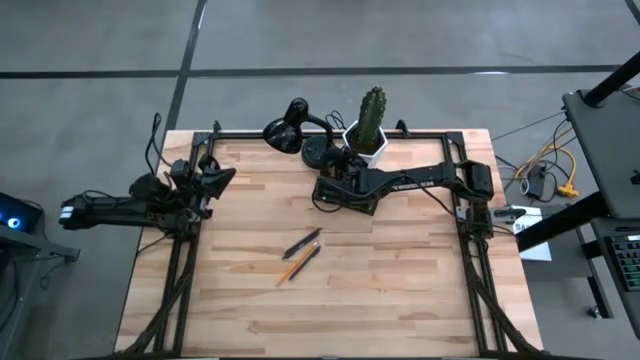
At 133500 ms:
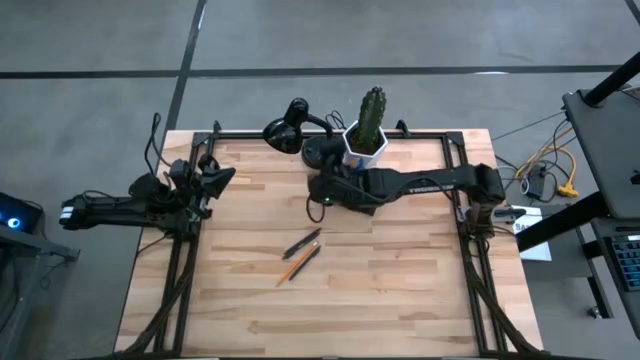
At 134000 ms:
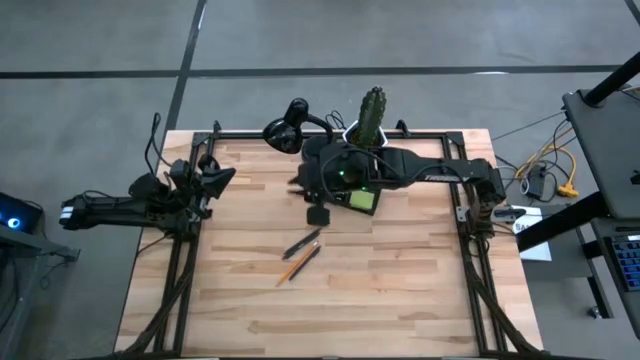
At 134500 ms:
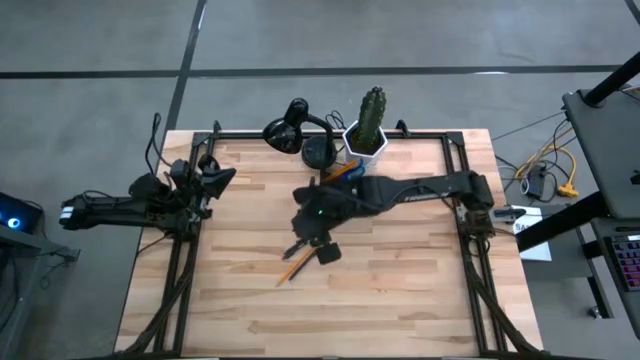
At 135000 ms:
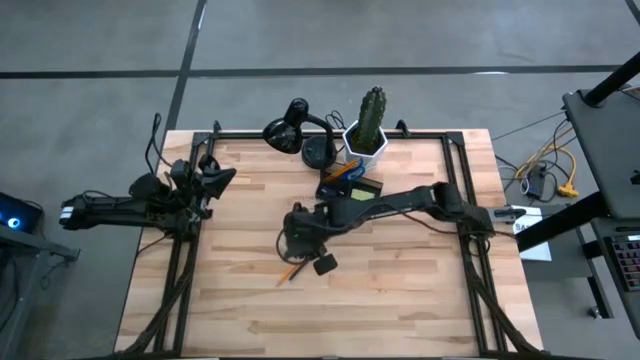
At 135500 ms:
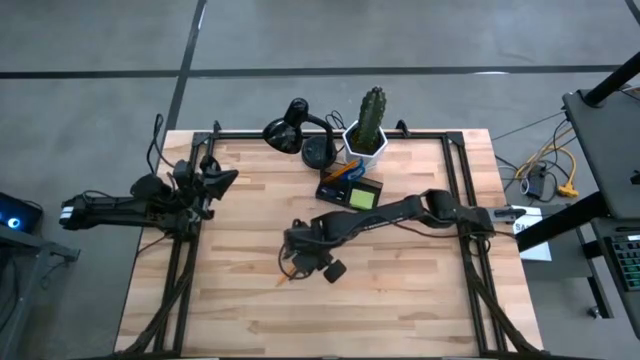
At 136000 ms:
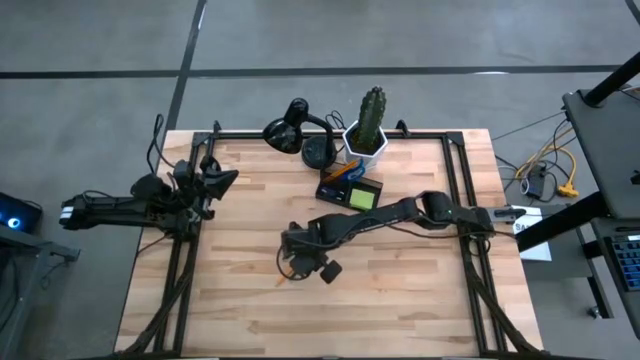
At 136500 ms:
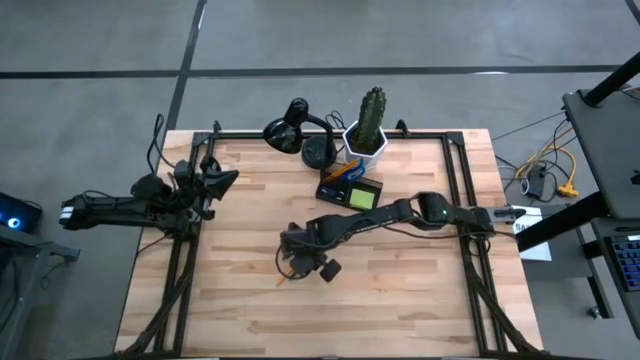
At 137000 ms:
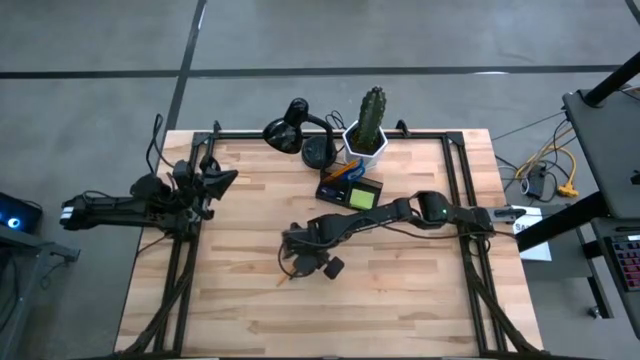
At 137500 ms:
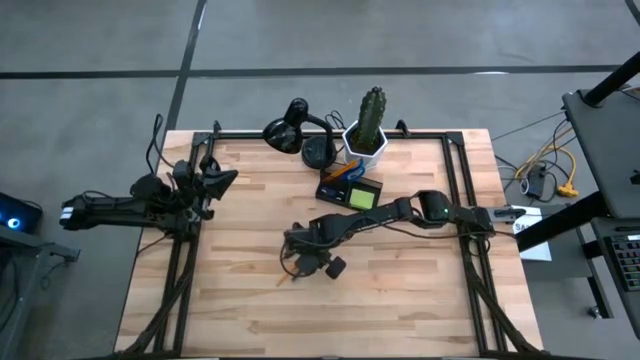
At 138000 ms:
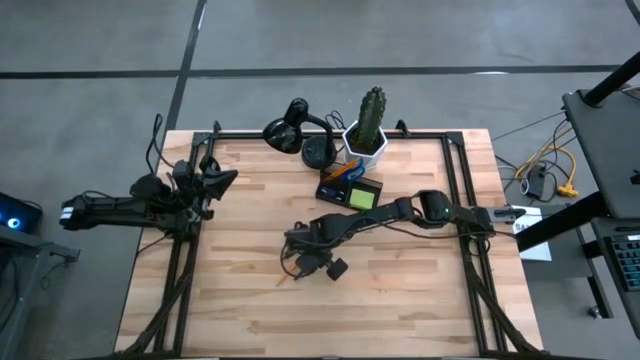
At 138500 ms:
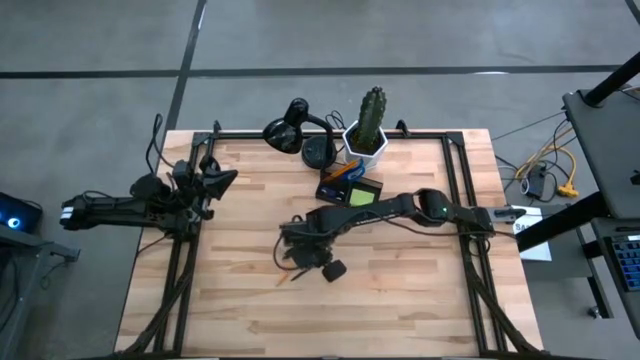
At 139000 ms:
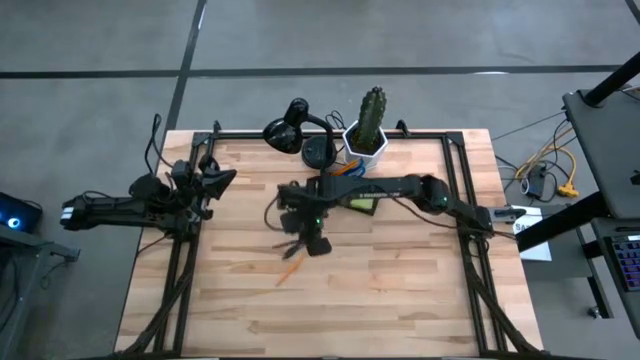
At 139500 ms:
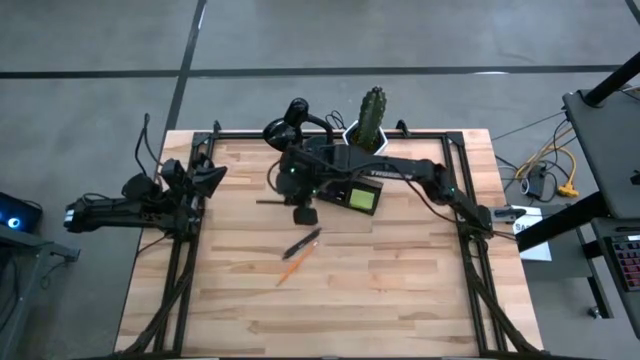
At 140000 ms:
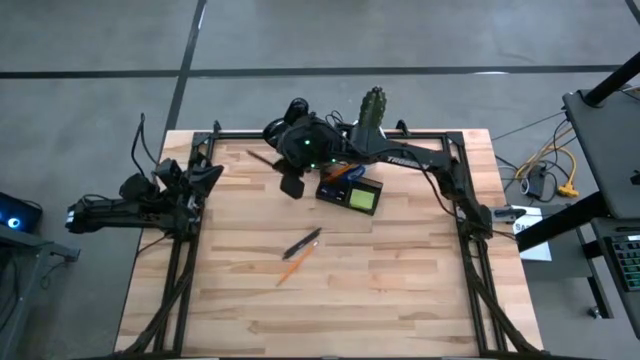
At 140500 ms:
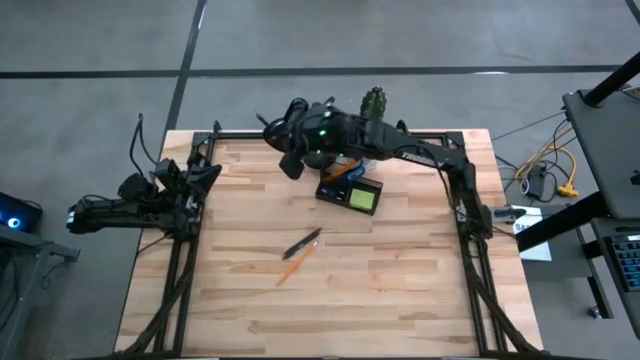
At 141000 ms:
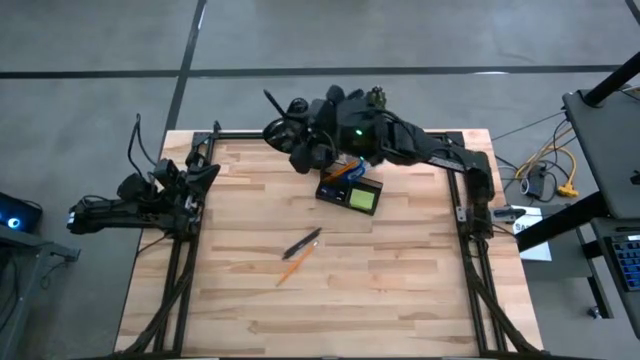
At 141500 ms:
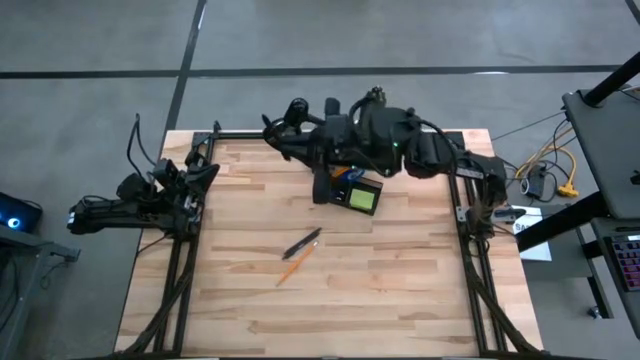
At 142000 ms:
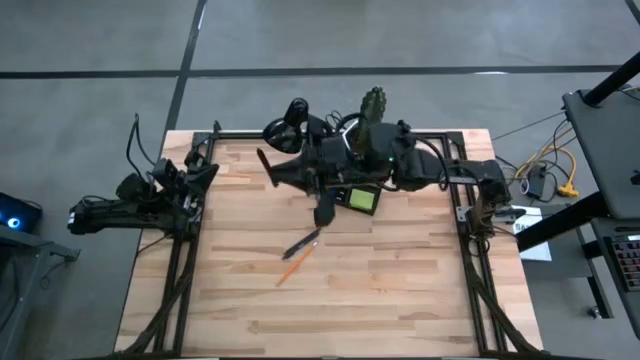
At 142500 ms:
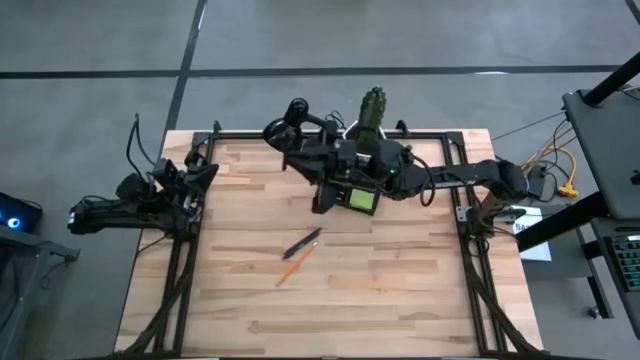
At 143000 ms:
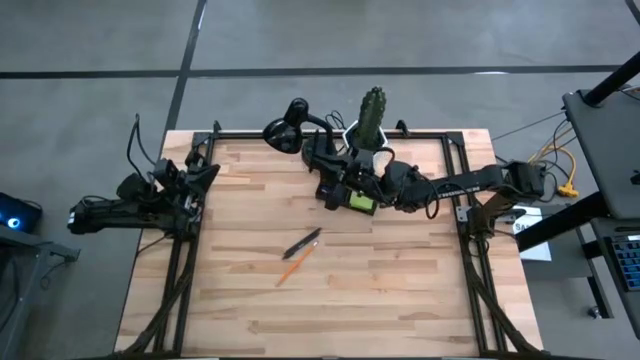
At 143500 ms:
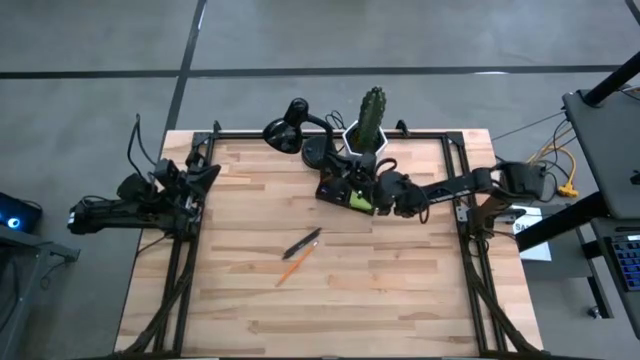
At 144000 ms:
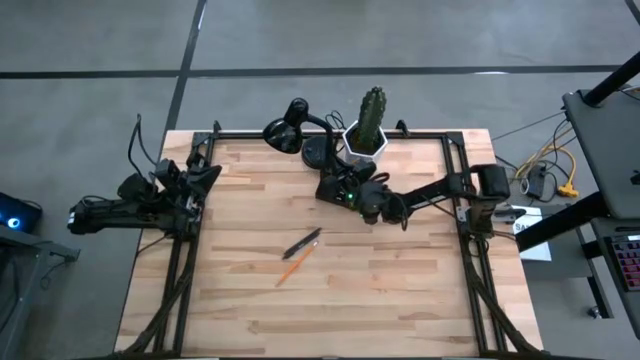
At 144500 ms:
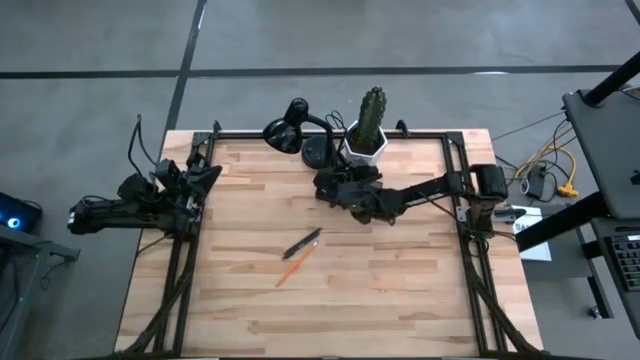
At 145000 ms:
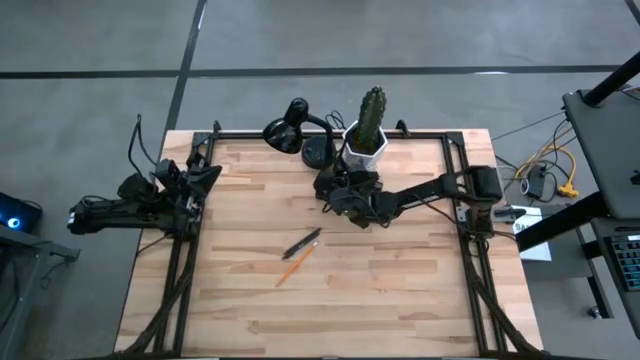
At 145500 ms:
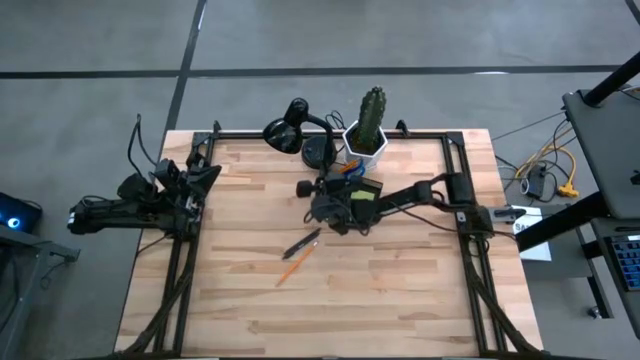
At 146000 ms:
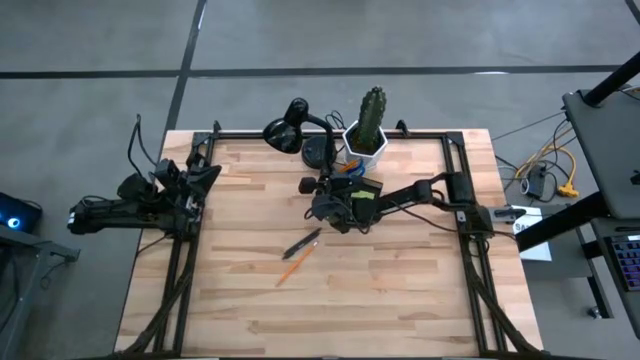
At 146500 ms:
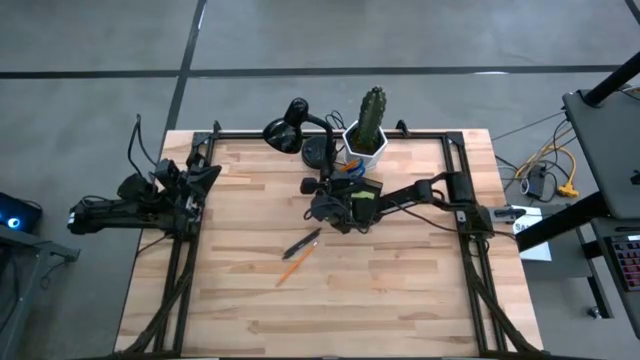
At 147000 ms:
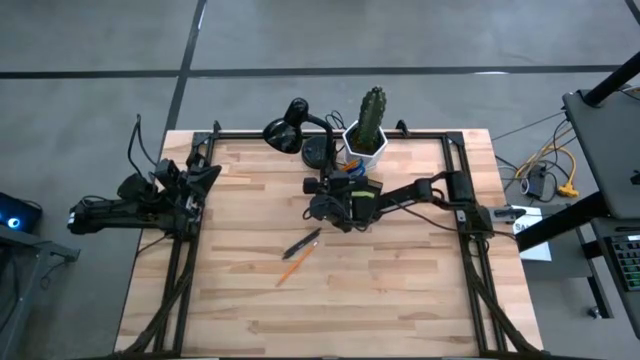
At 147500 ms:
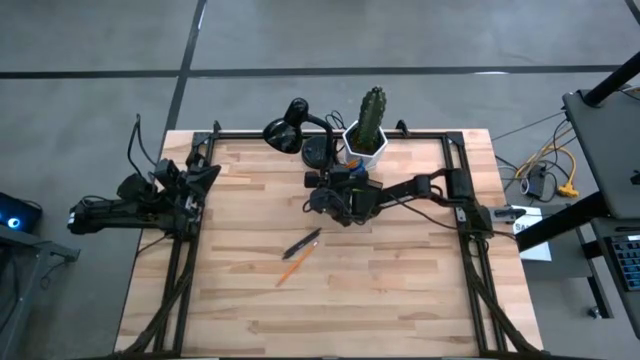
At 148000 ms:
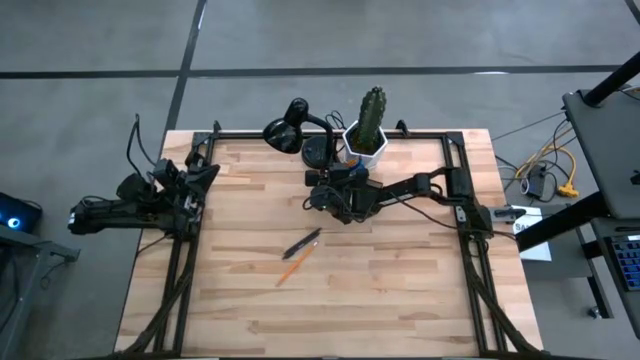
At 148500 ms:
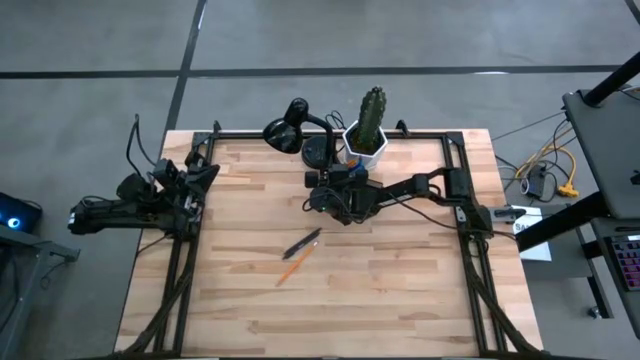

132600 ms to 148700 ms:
Task: Pick and place office supplies into organizer
Put the bottom black pen into the black desk organizer

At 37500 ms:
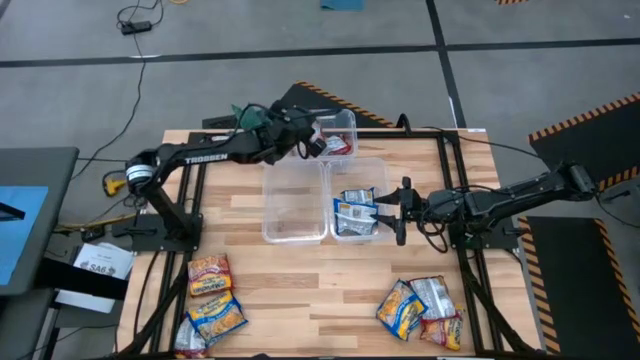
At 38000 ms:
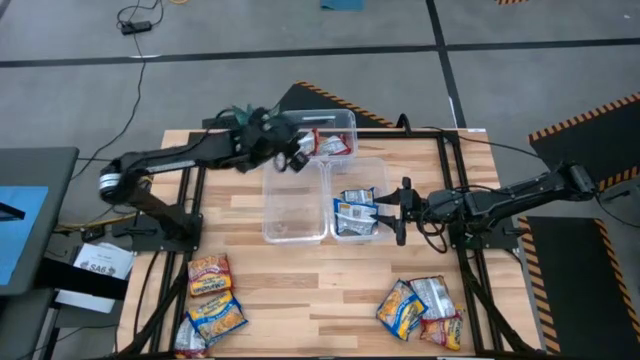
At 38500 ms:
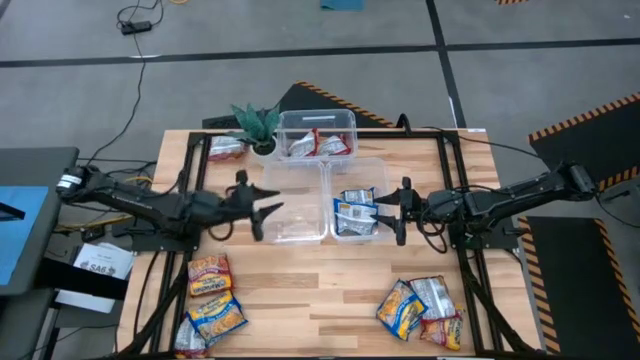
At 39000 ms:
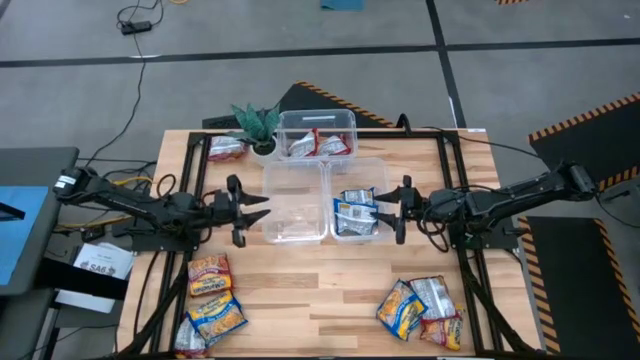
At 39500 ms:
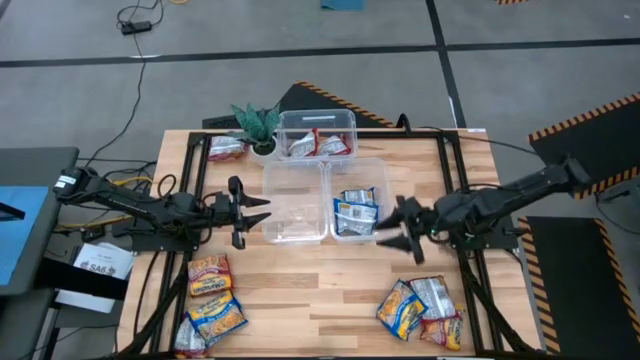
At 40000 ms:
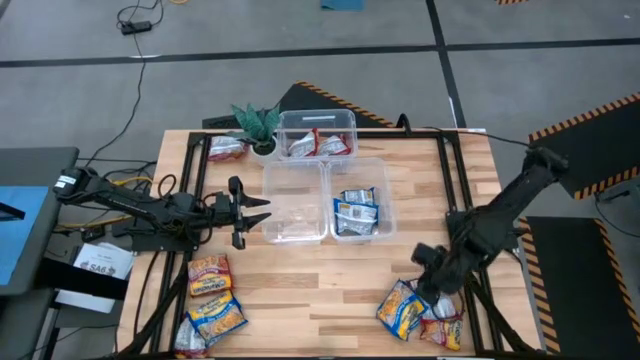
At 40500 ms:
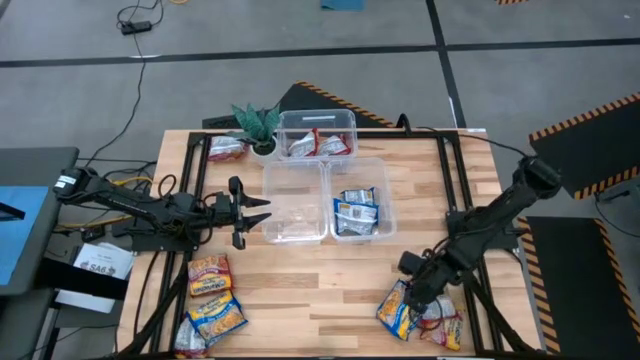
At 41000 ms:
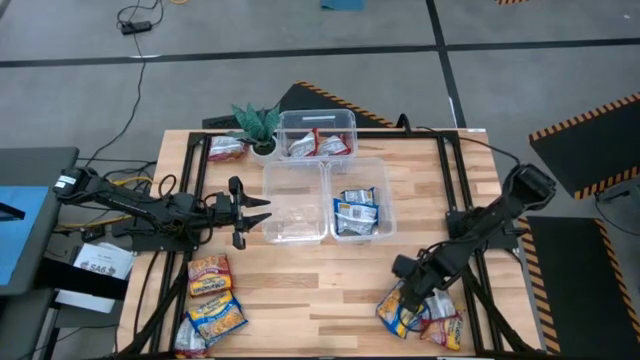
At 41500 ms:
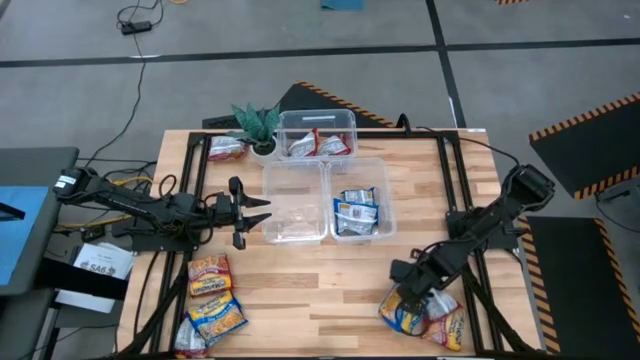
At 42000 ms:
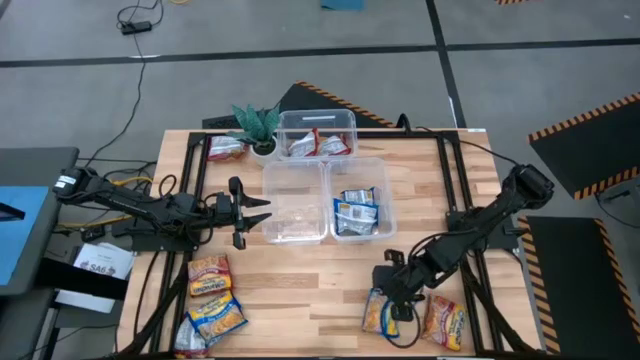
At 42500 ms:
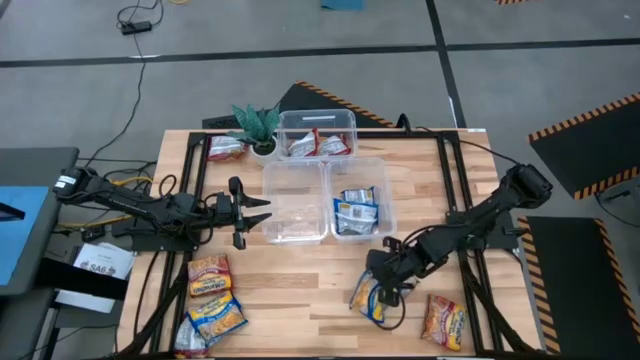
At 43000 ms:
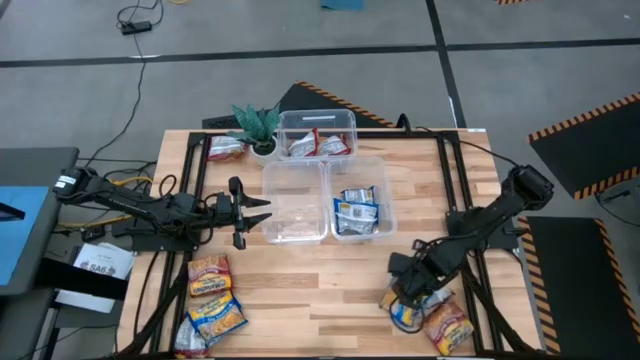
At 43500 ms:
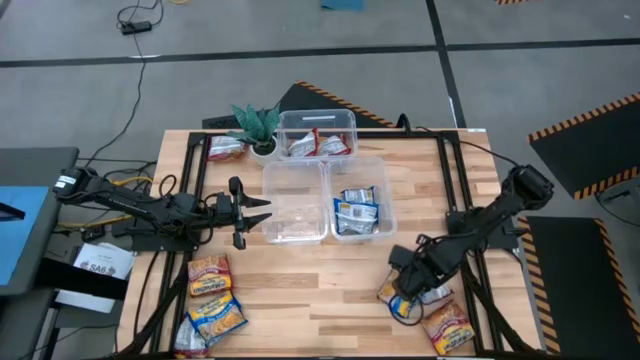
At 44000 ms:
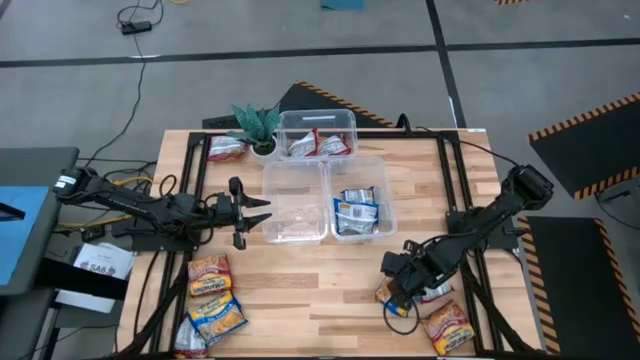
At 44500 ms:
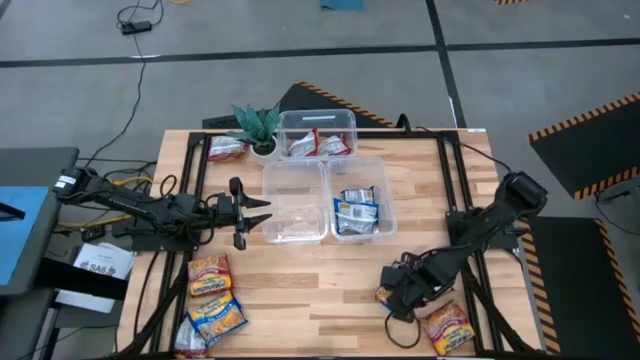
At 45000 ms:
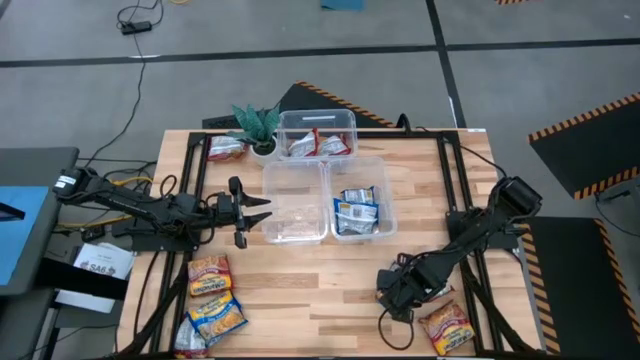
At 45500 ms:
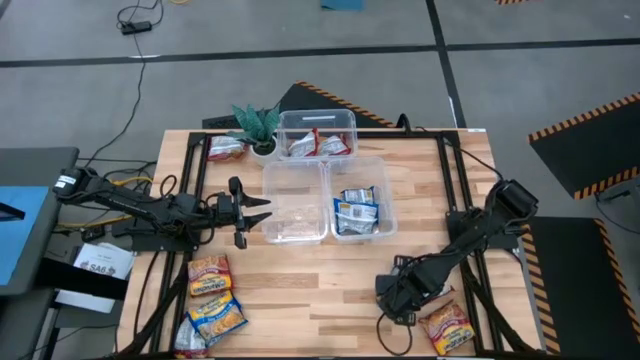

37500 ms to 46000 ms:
Task: Sort Maruchan noodles
Put the blue noodle pack into the bottom right transparent bin
